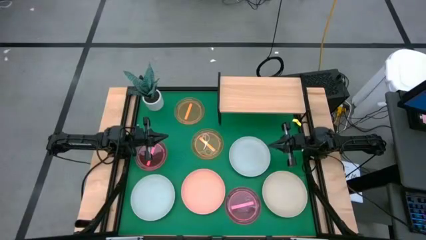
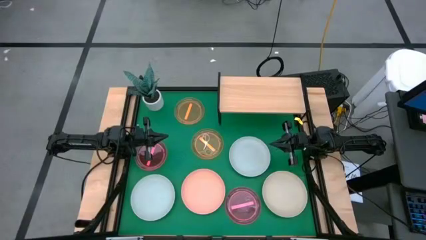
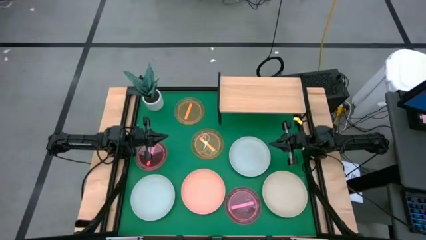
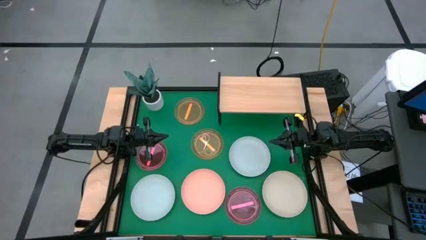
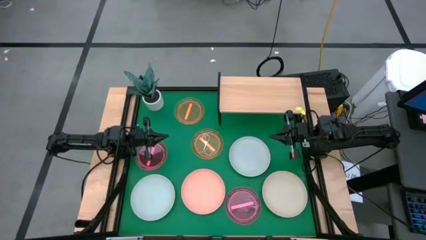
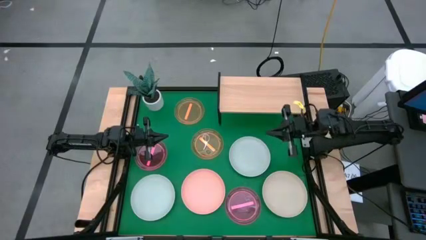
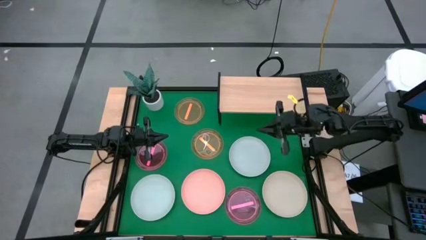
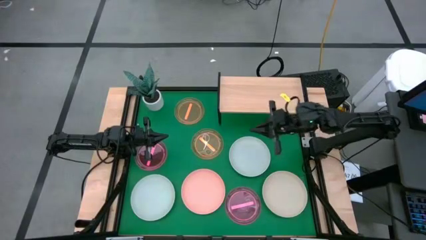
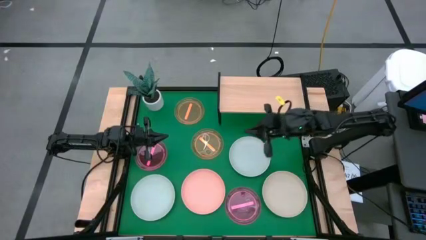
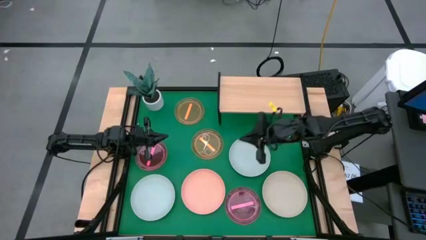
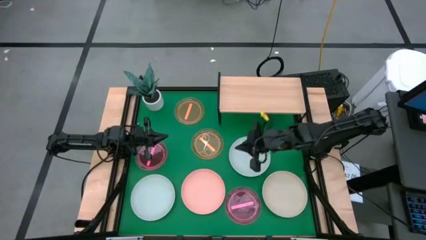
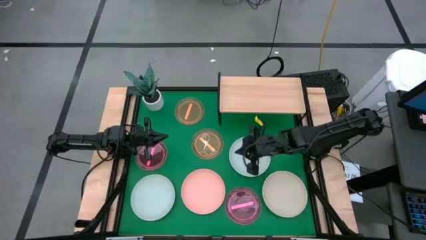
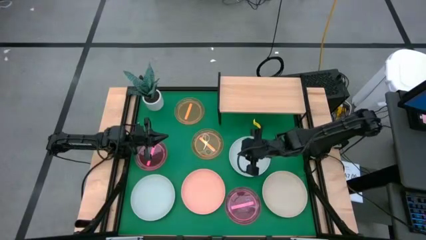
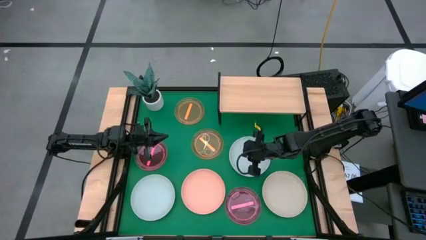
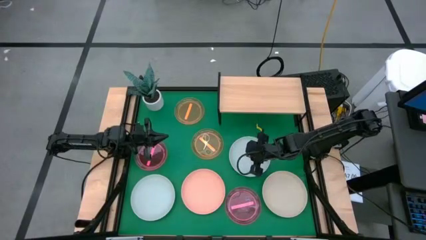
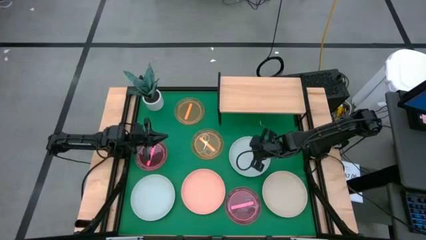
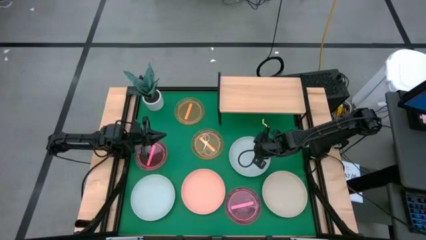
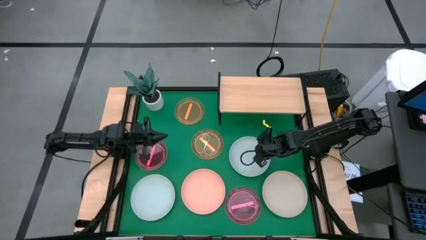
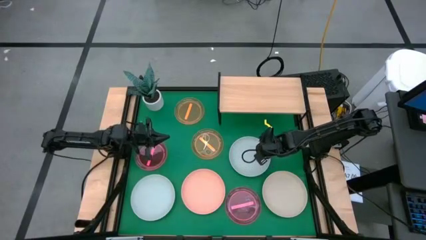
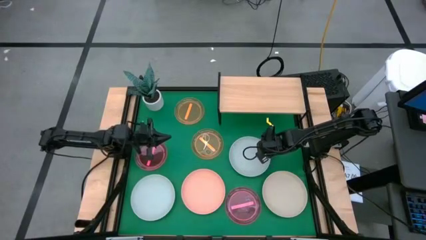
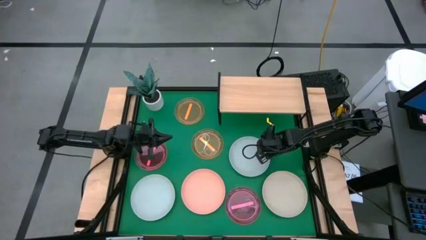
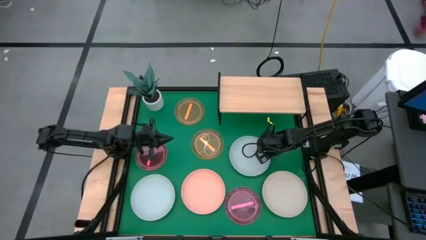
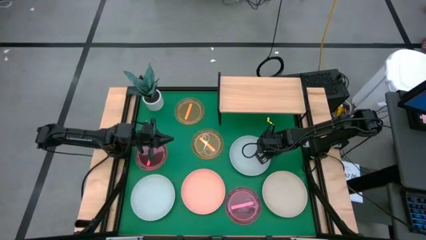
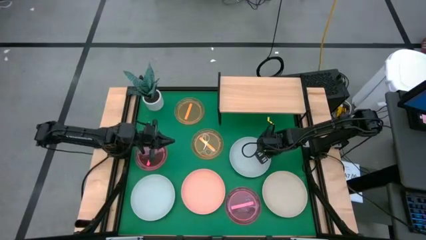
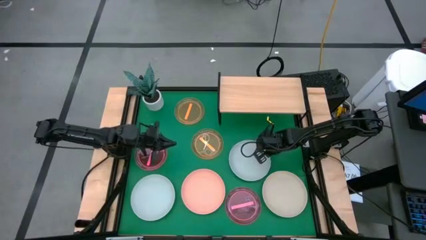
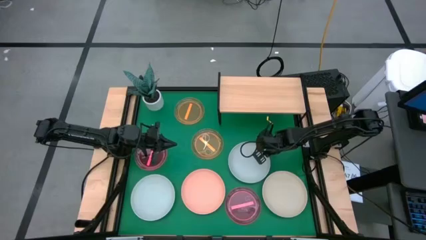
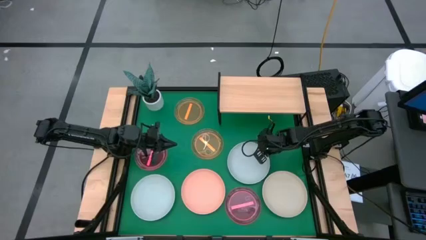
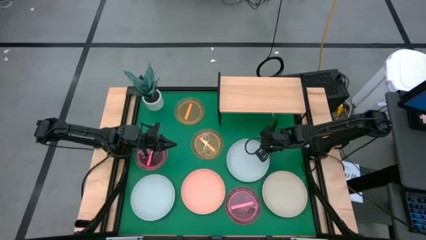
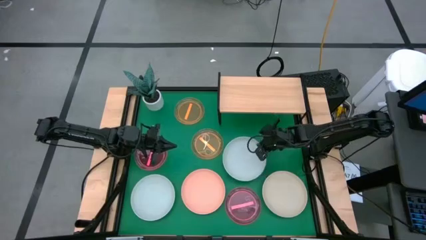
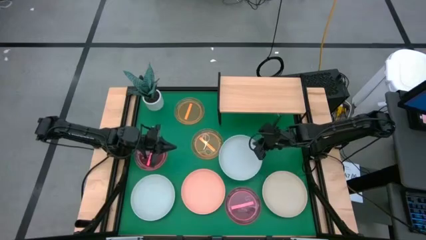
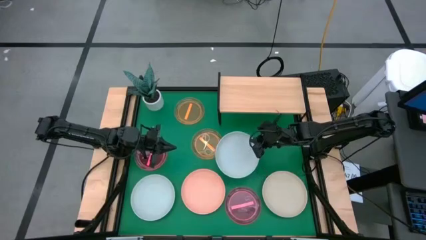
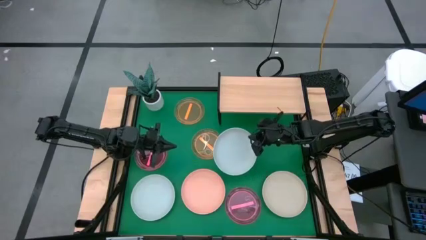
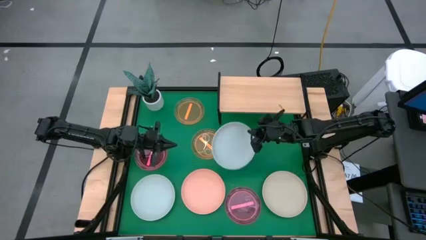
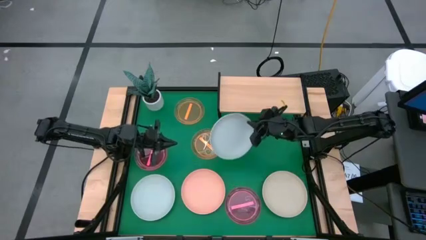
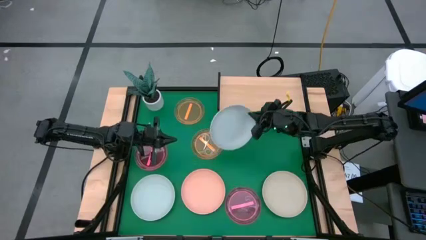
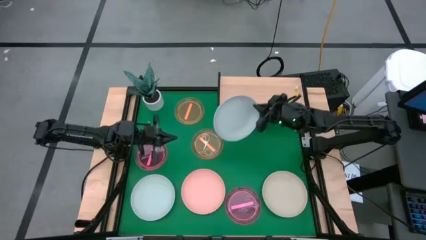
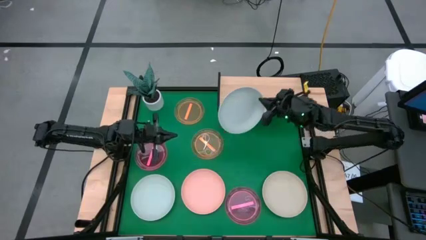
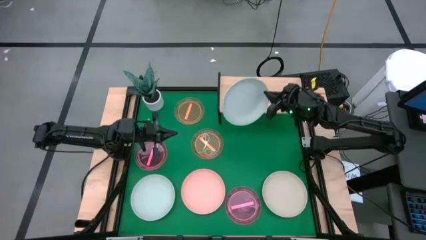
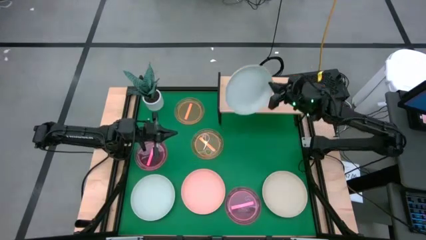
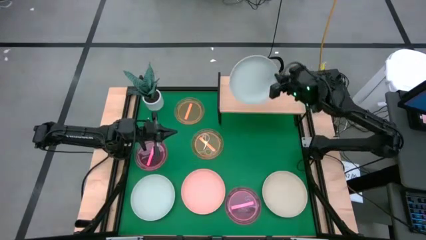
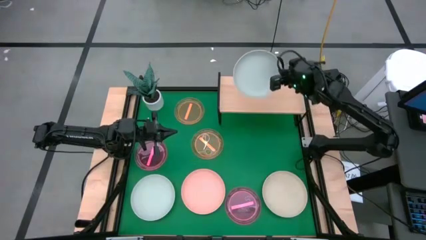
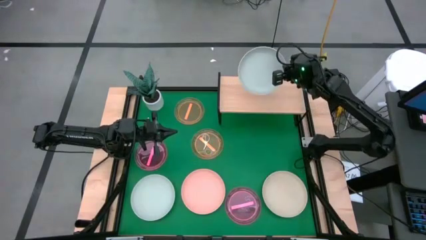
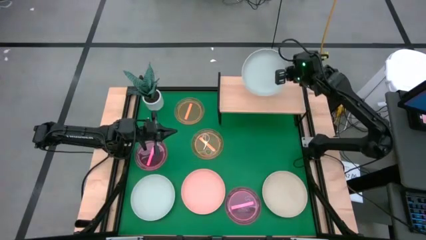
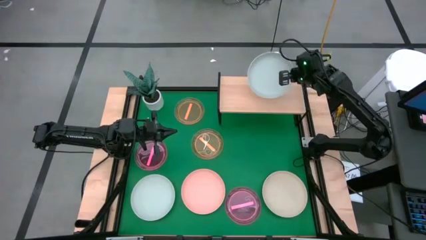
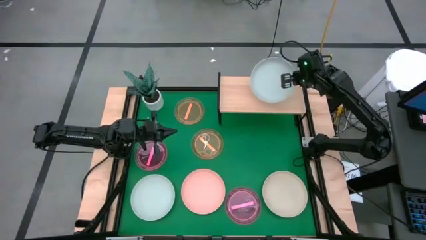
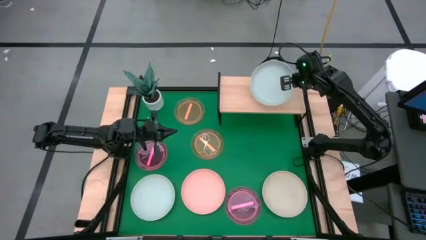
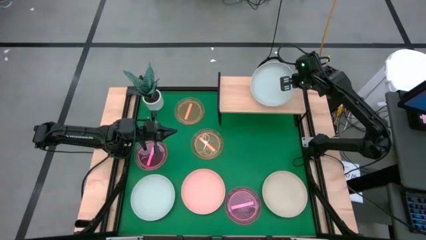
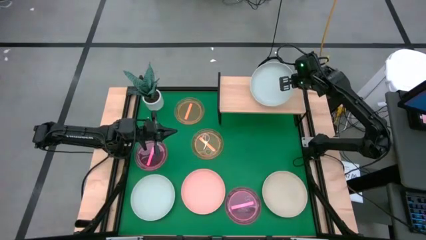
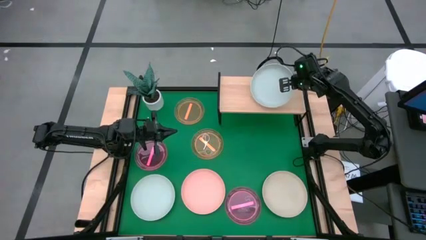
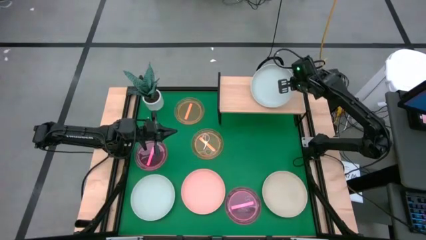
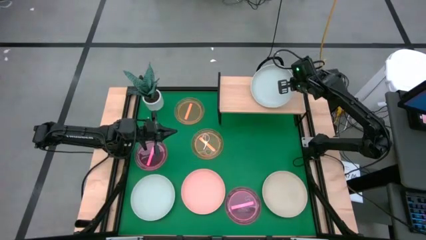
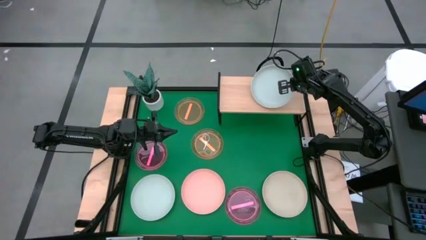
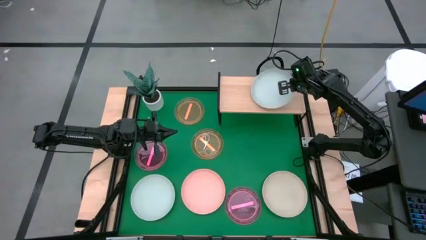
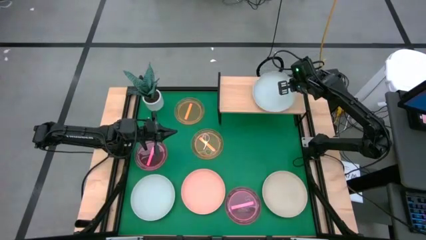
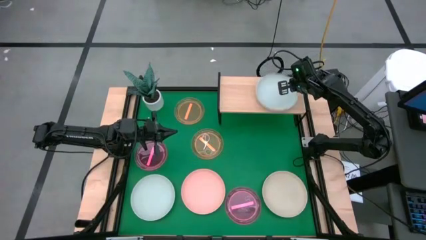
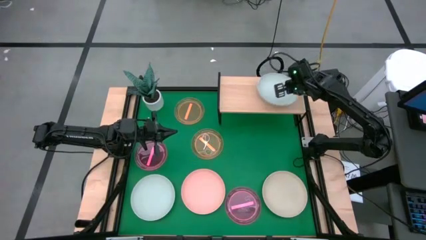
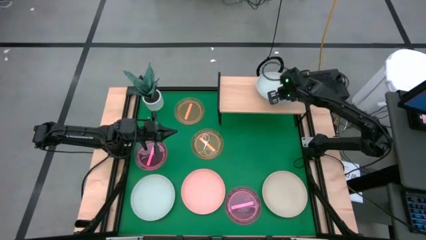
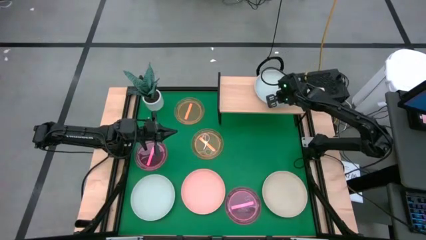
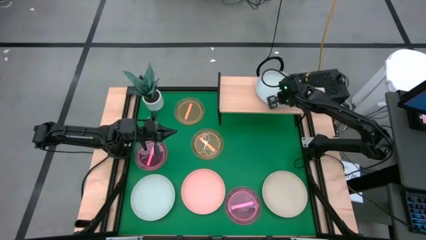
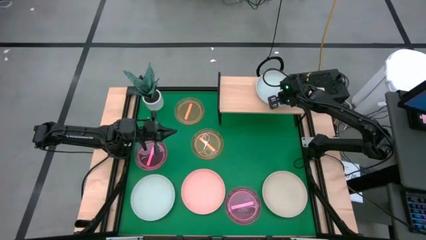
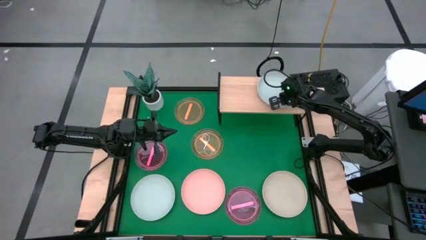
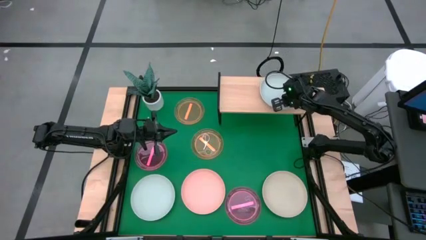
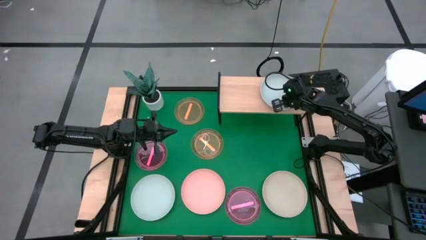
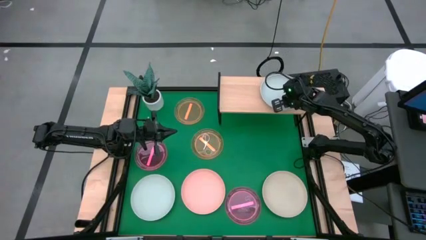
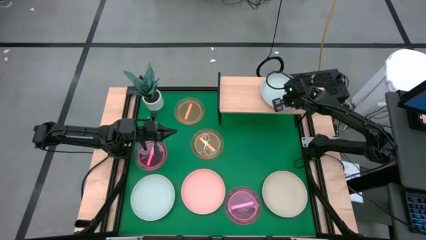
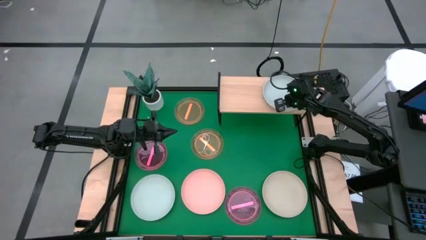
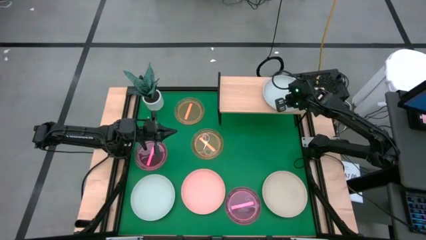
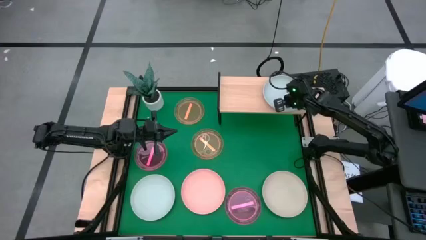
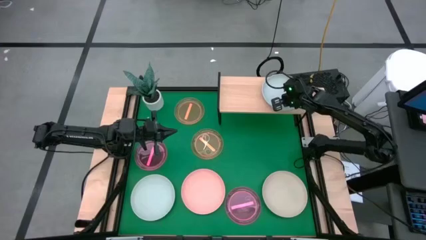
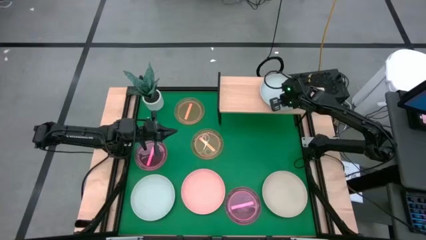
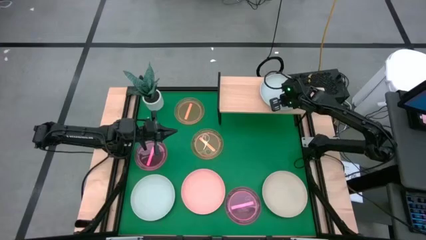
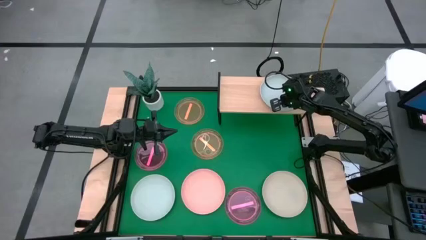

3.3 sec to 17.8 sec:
Task: Place and stack plates onto a shelf
Put the right large gray plate on the shelf

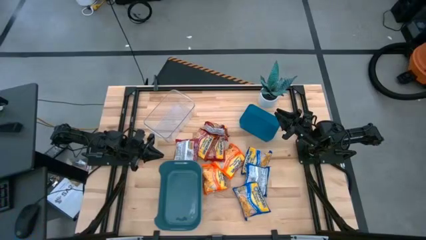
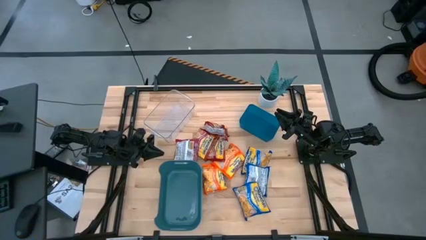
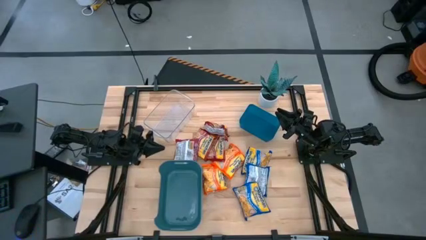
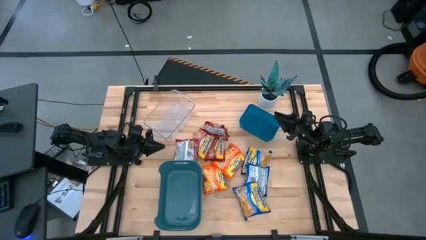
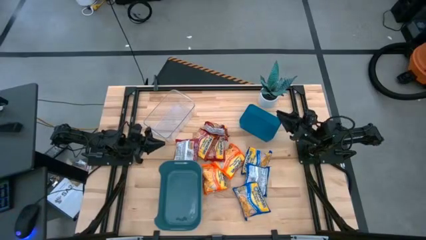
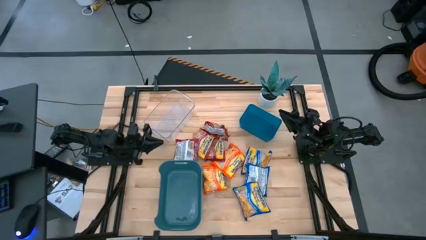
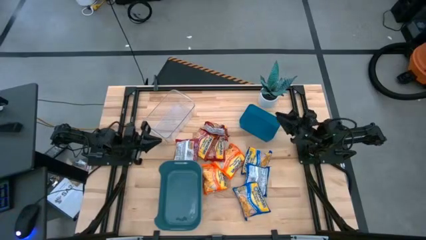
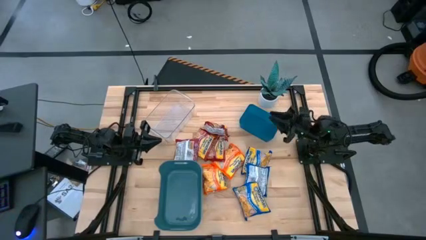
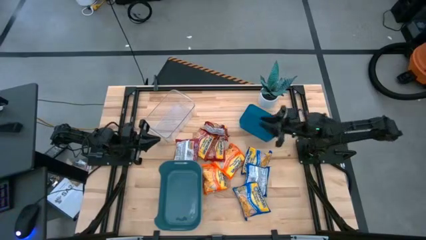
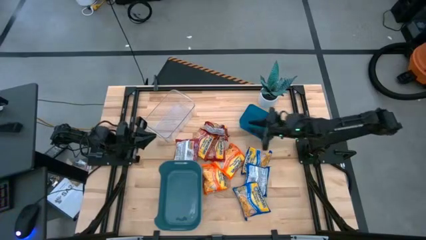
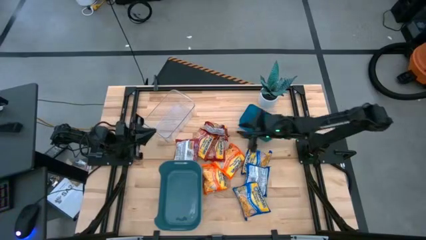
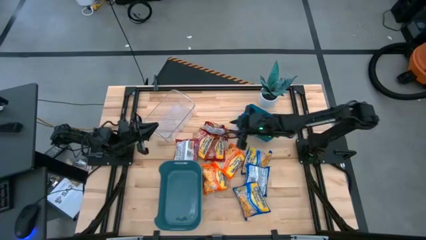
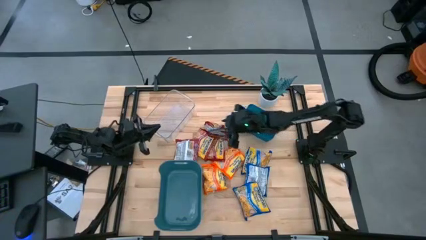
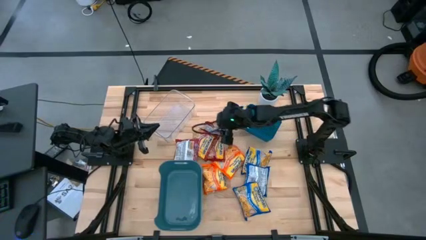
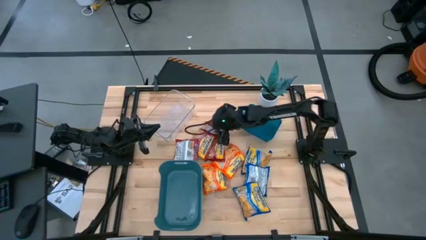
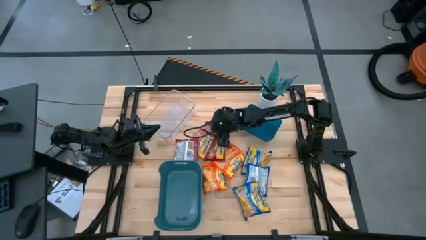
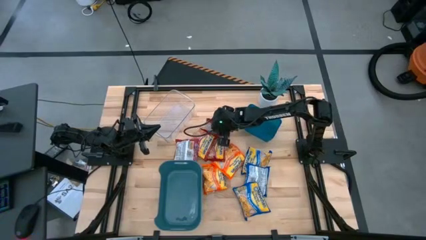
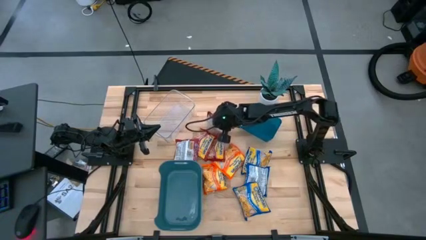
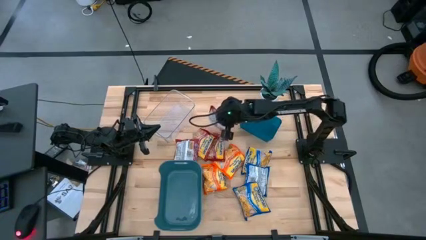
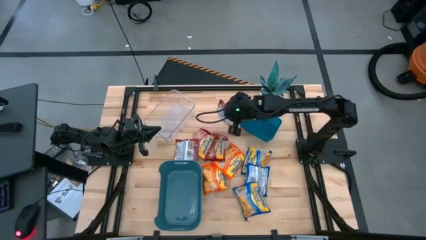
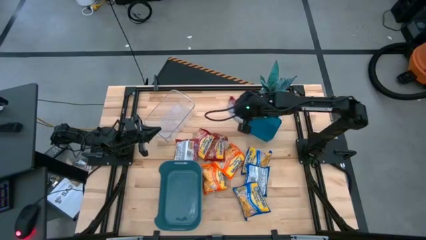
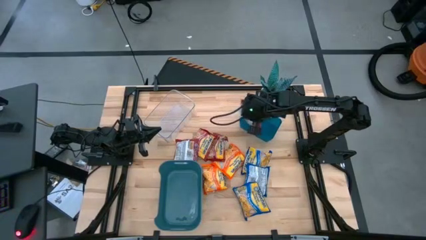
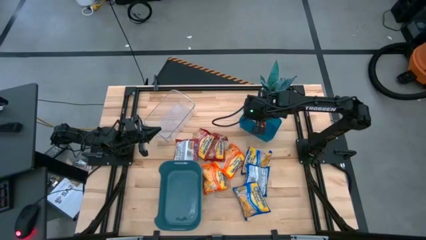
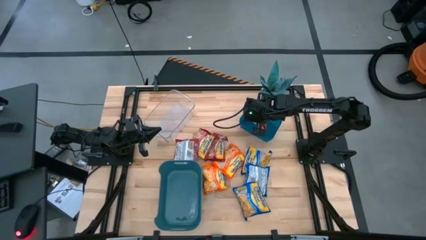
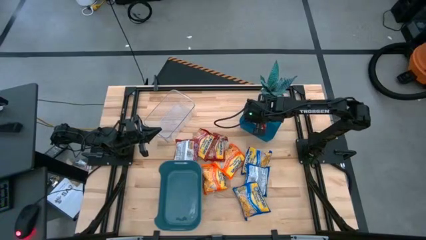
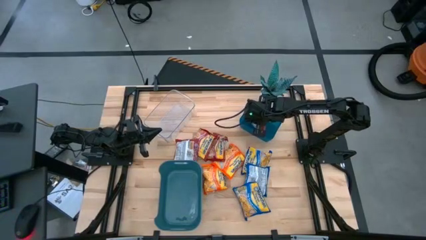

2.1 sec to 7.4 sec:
Task: Sort Maruchan noodles
Put the red noodle pack into the small blue bin
